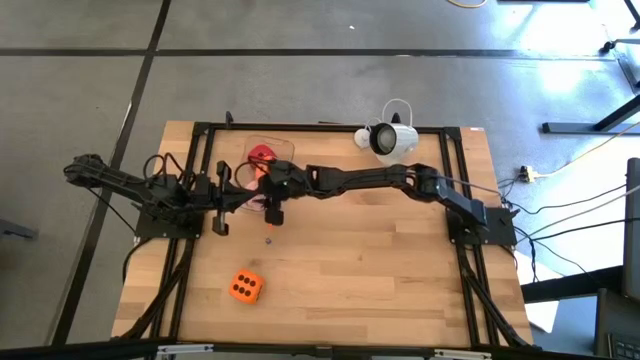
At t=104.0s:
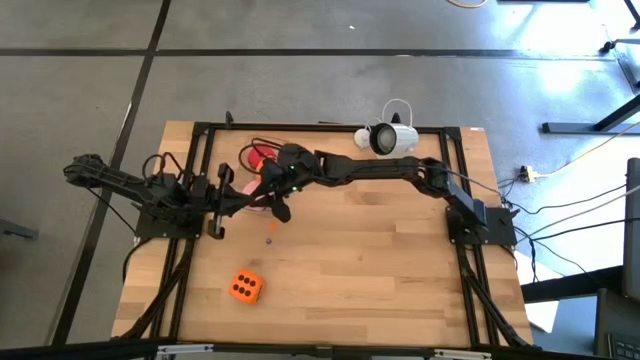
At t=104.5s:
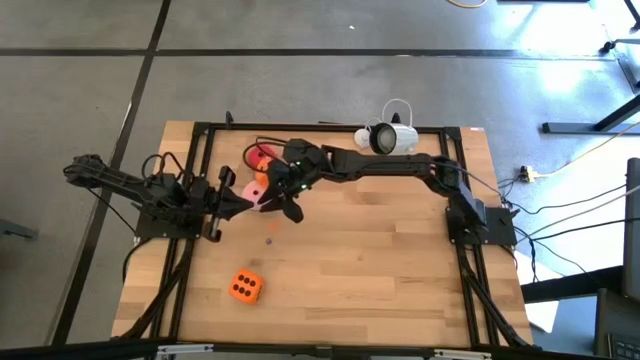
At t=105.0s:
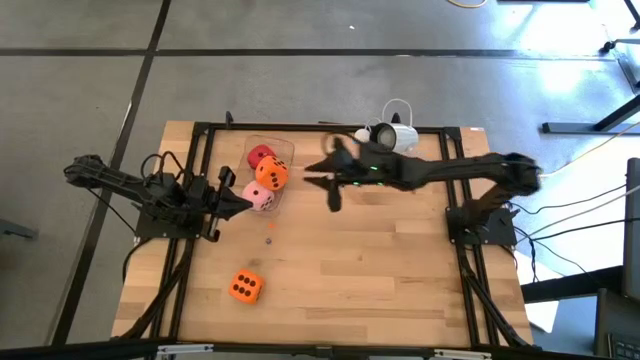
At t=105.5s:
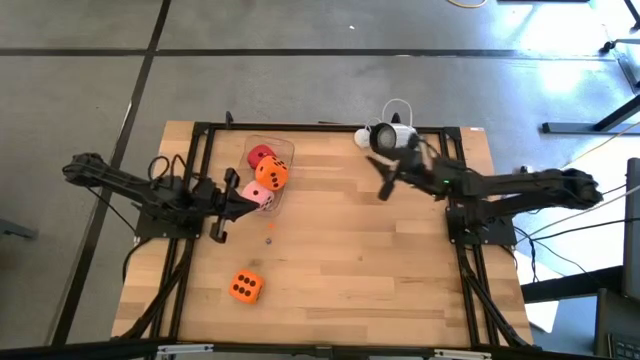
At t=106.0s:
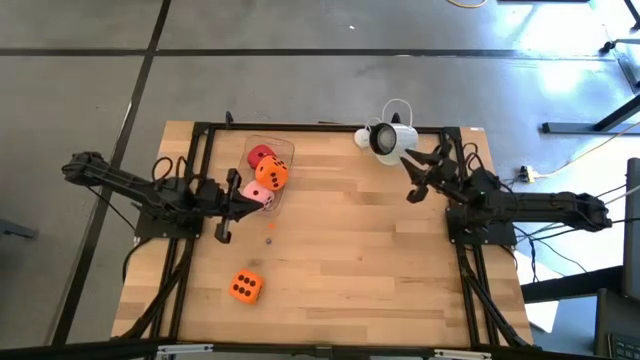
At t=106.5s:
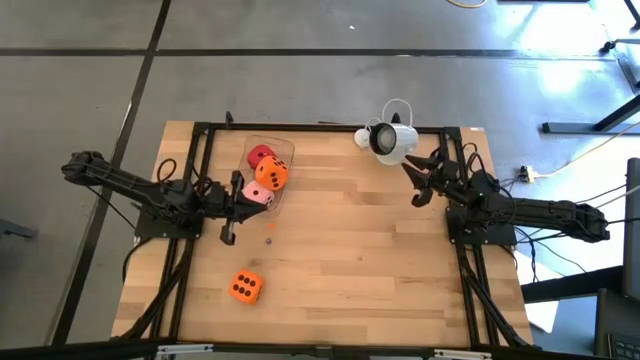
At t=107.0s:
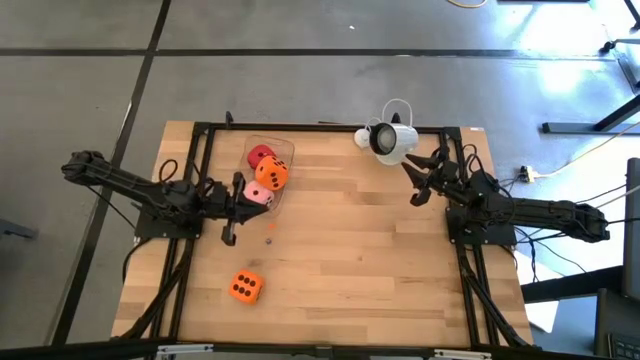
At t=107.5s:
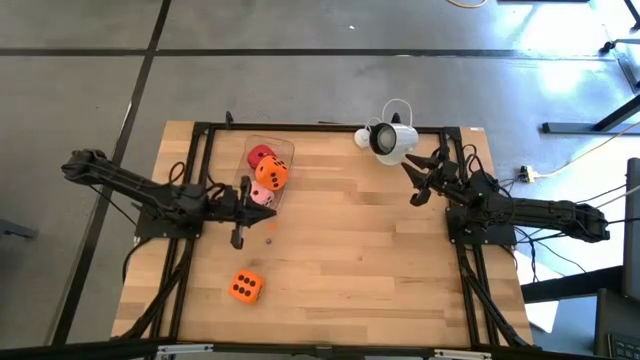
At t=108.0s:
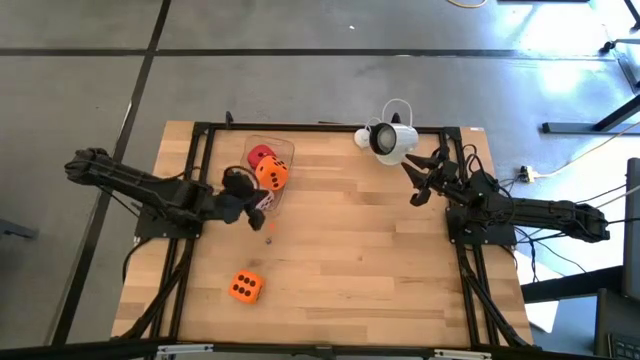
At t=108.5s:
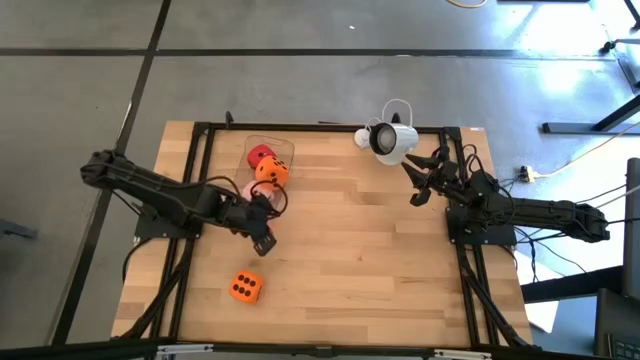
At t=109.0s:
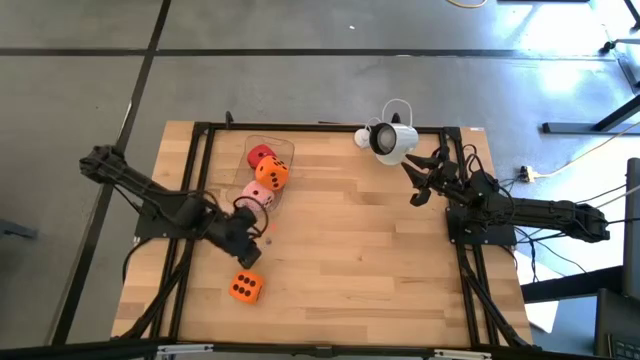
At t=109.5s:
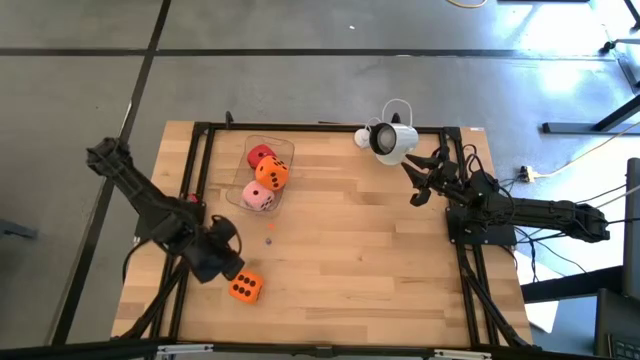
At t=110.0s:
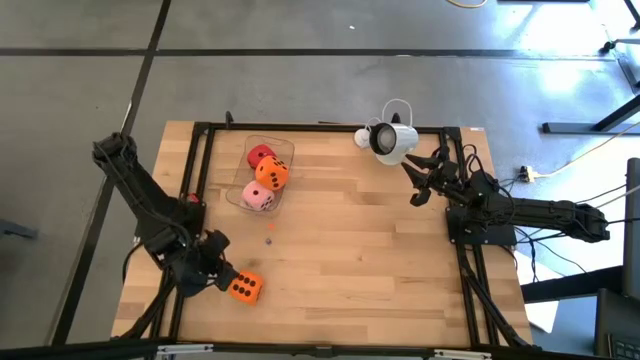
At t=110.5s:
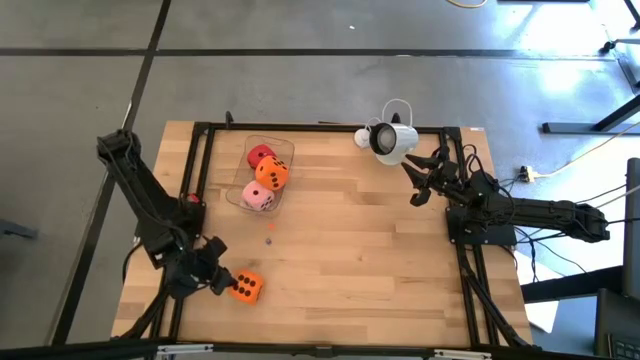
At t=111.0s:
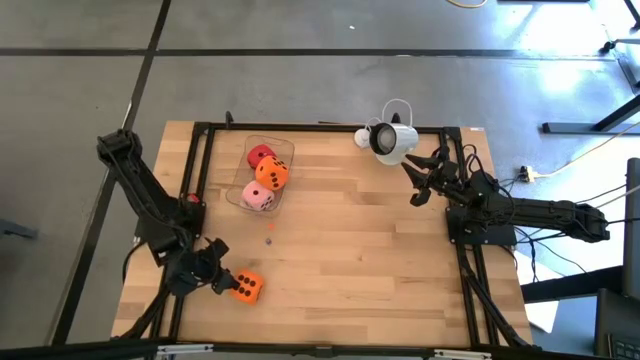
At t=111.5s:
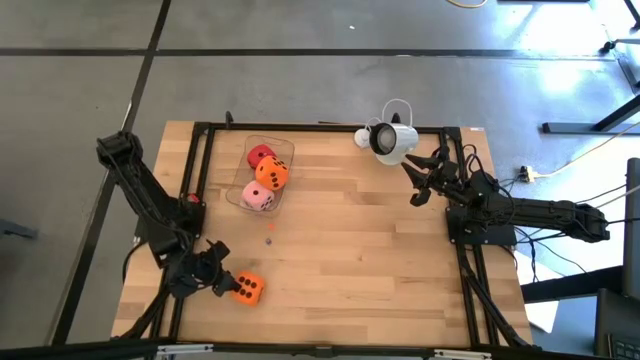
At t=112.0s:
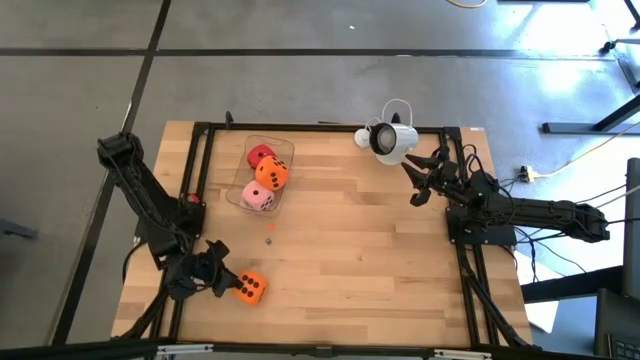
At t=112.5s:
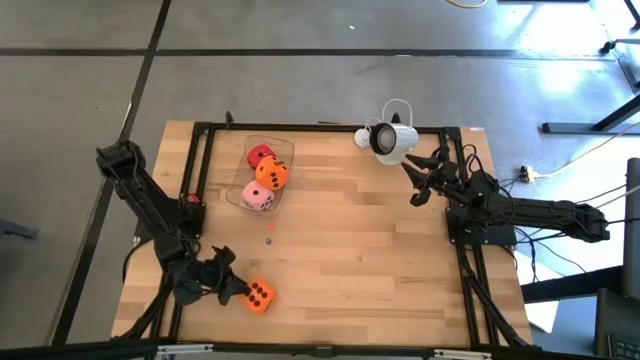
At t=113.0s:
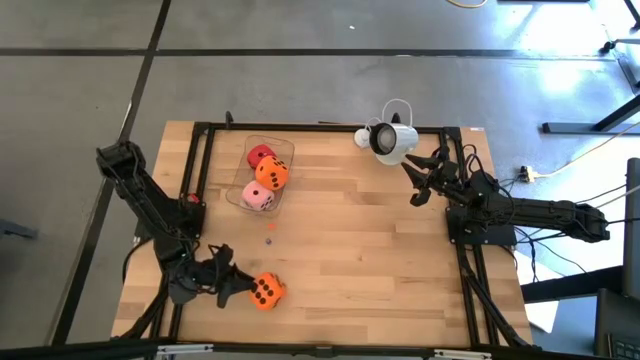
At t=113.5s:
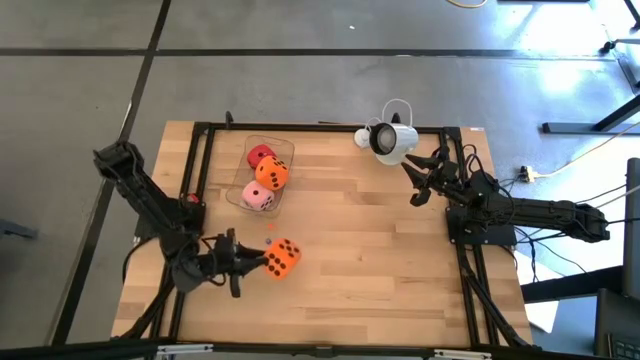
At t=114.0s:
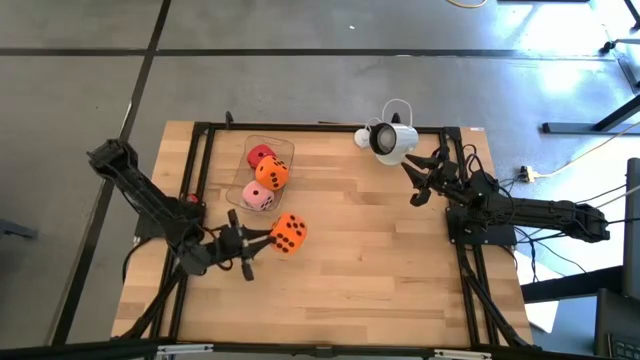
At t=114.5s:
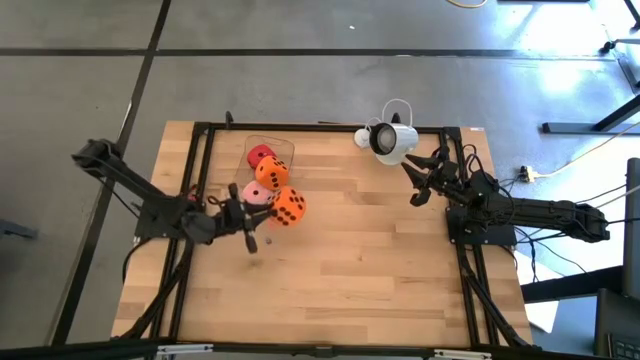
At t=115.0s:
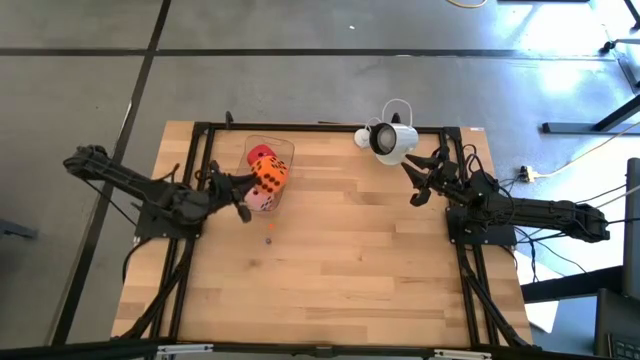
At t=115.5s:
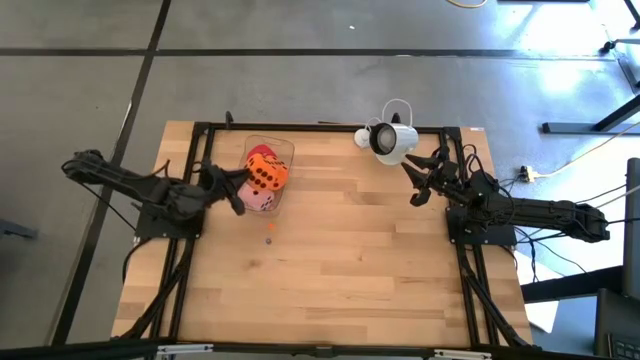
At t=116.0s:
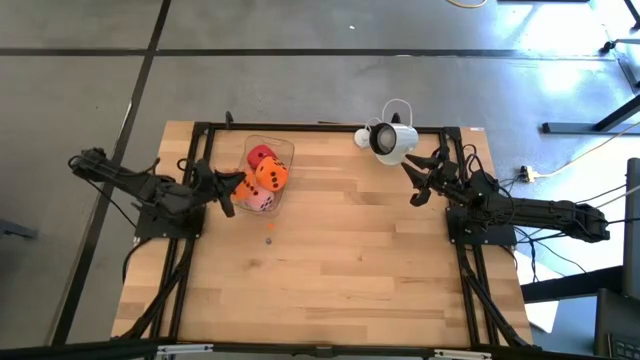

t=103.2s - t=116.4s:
Task: Pick & Place Dice
Put the large orange die into the transparent bin

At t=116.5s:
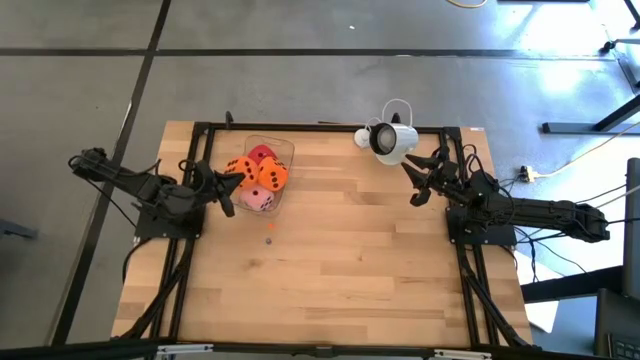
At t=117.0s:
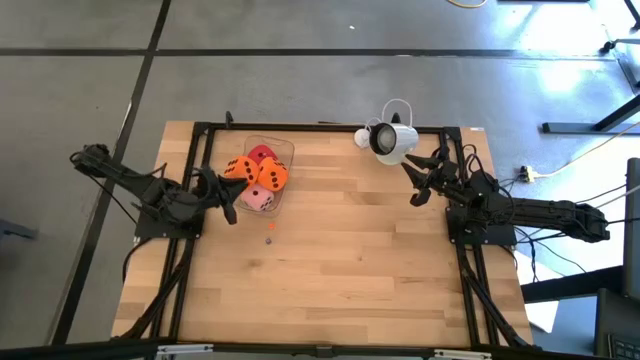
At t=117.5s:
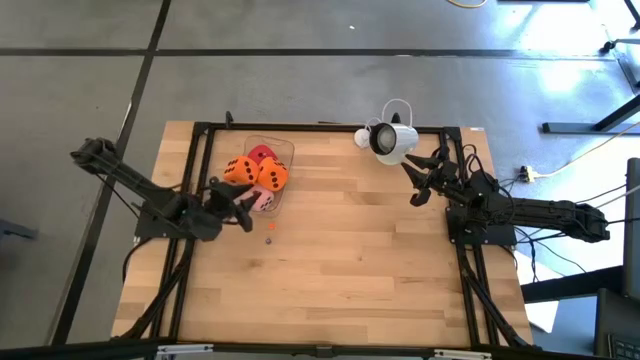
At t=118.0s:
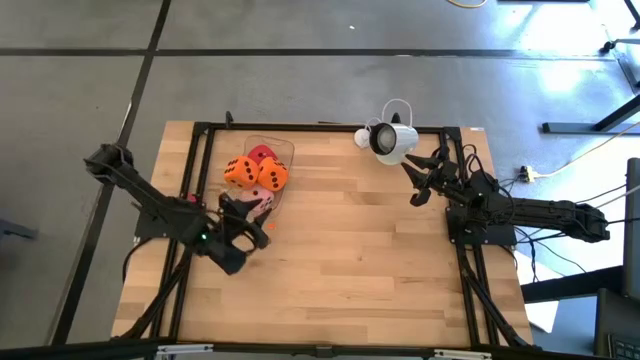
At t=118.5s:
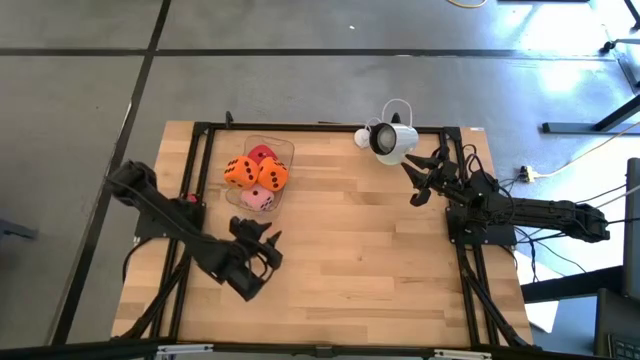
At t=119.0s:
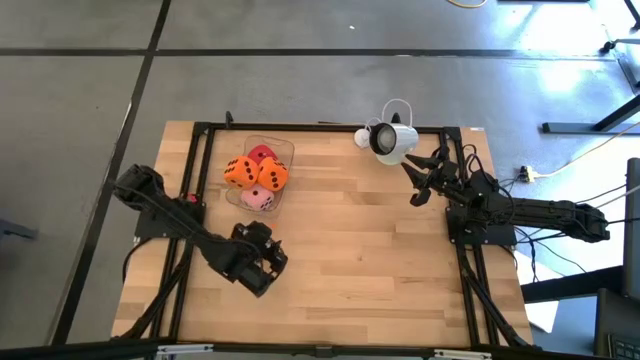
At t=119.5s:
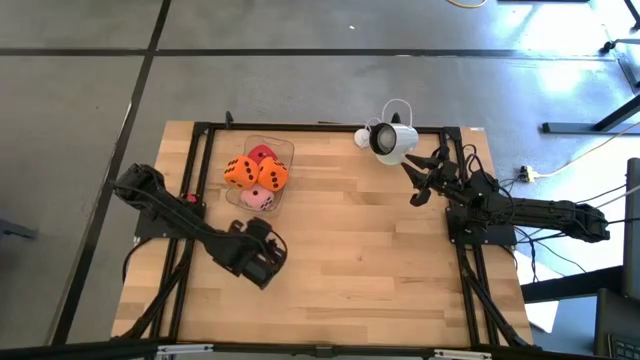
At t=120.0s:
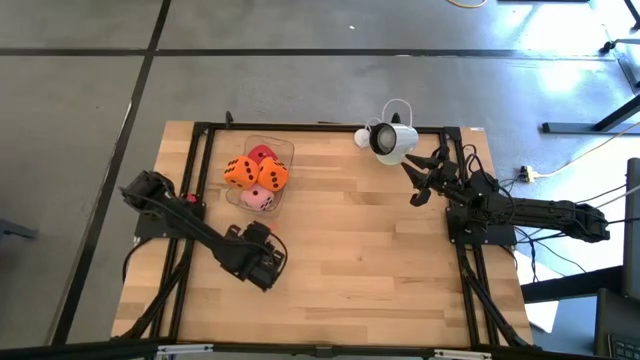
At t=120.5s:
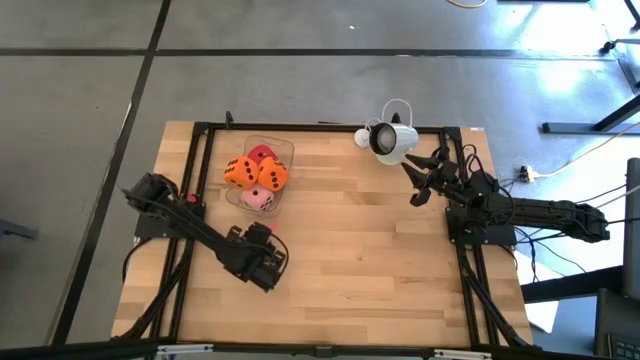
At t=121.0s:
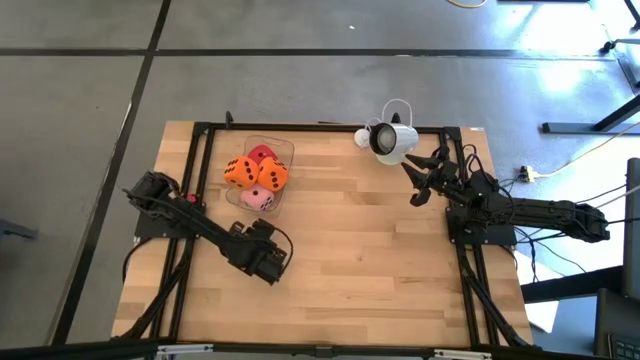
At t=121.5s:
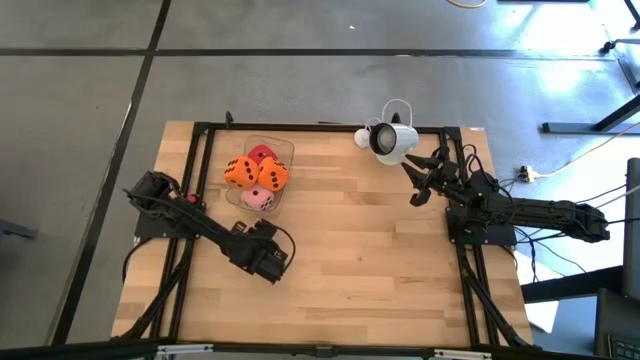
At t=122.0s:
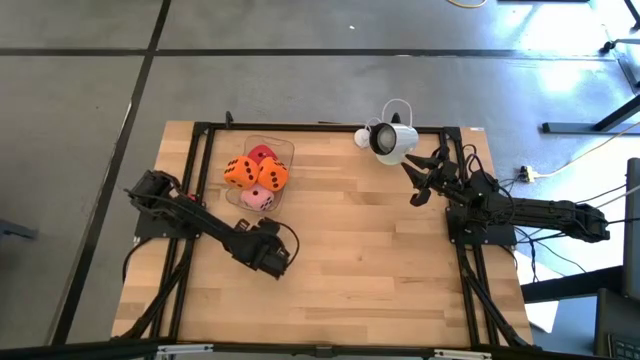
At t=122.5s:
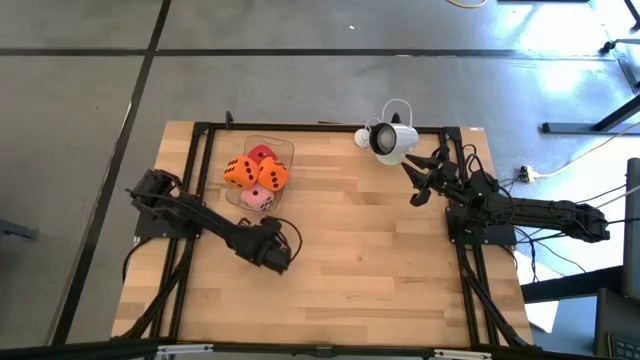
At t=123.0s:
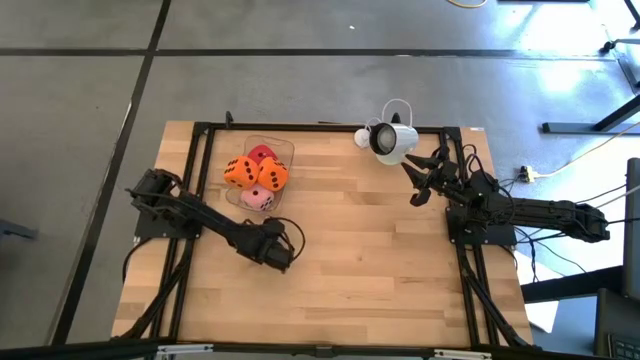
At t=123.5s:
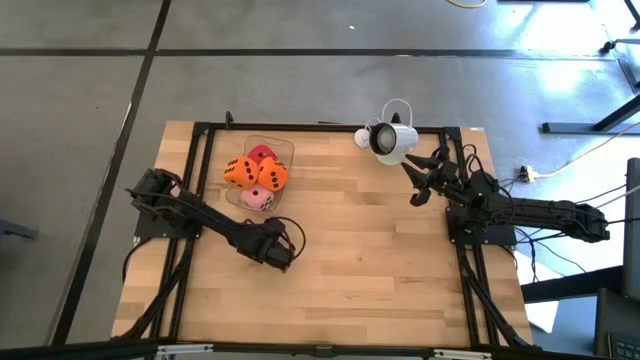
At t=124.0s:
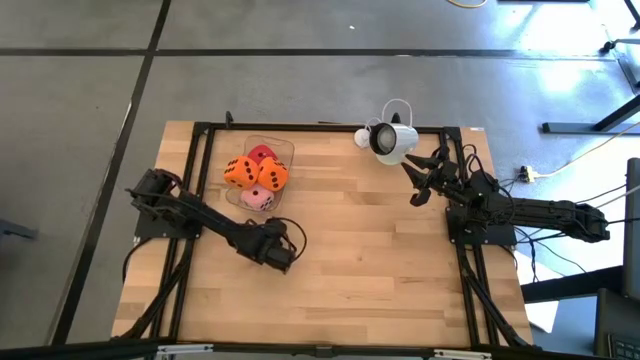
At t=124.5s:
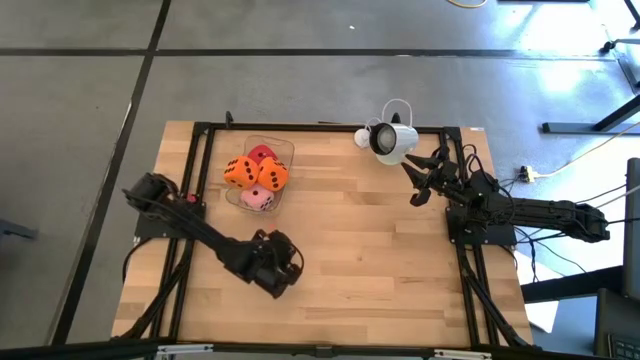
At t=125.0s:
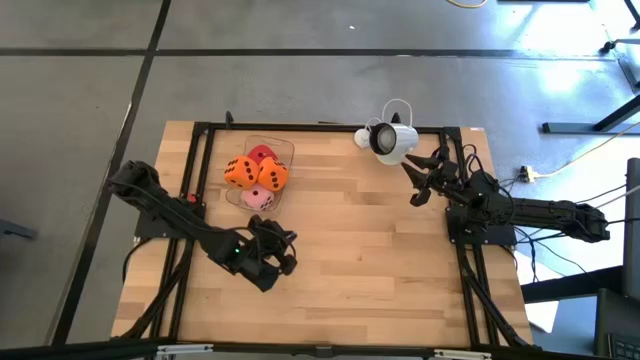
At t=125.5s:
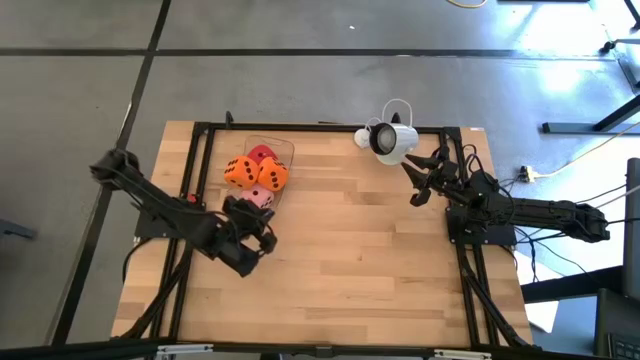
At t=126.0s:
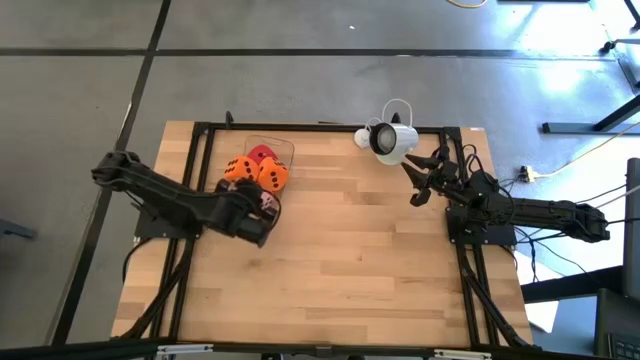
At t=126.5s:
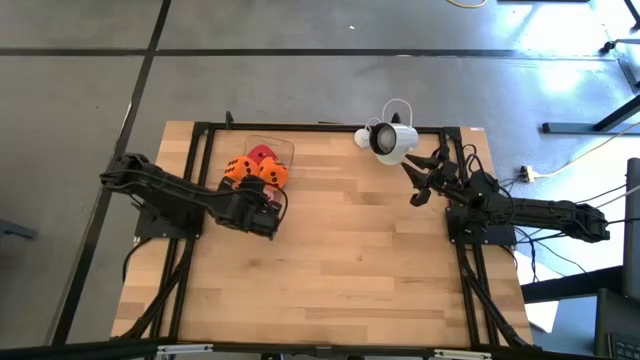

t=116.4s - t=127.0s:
Put the small blue die into the transparent bin
